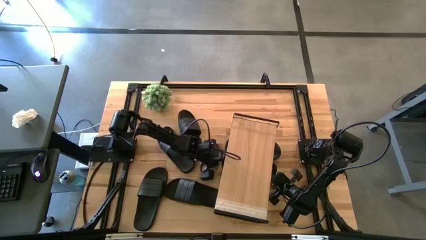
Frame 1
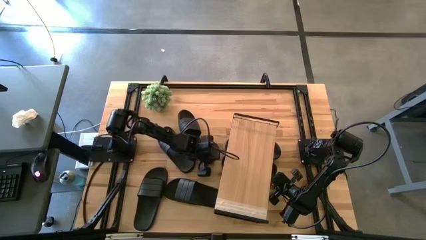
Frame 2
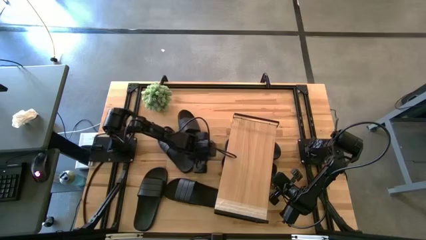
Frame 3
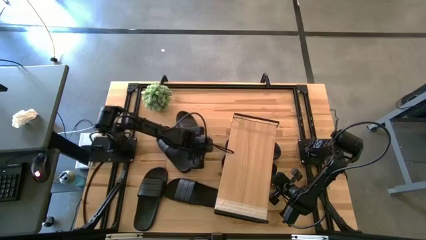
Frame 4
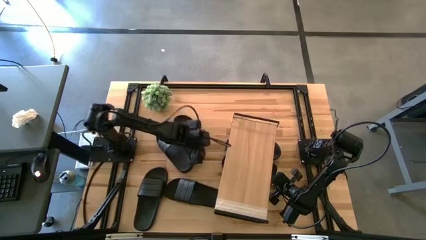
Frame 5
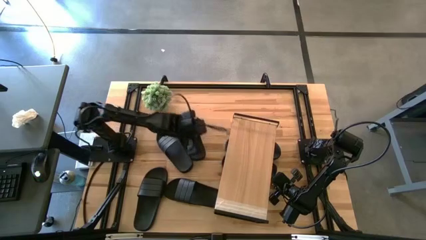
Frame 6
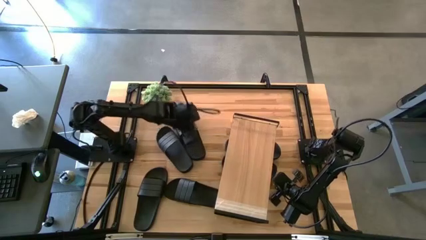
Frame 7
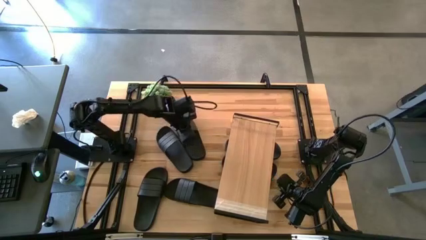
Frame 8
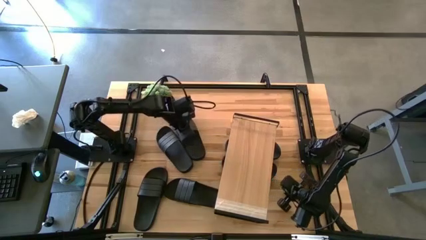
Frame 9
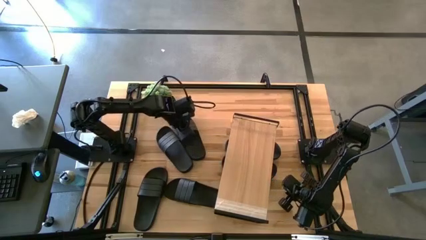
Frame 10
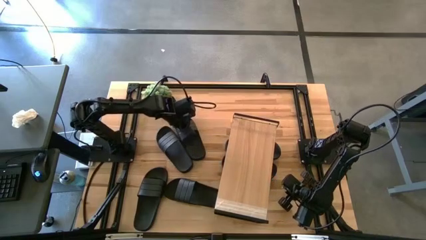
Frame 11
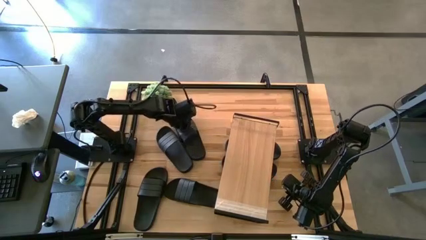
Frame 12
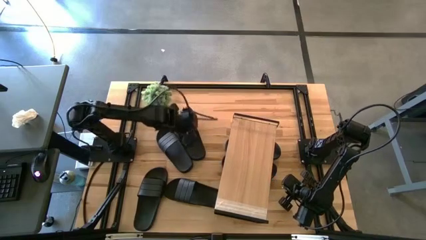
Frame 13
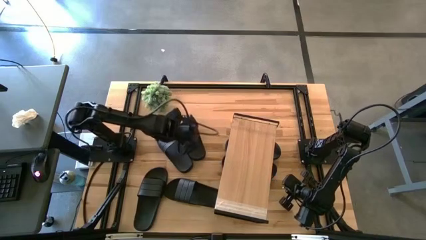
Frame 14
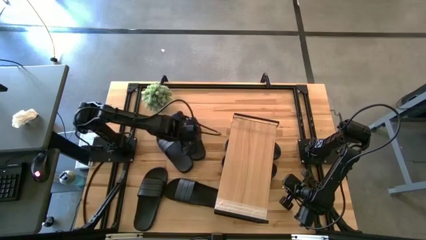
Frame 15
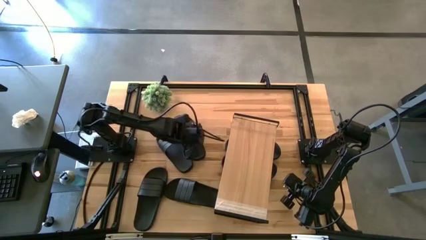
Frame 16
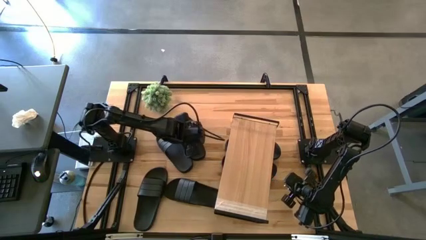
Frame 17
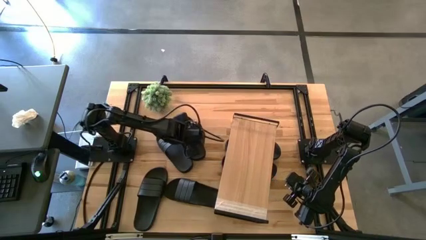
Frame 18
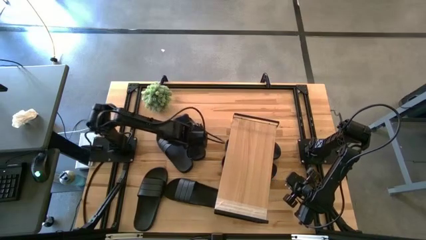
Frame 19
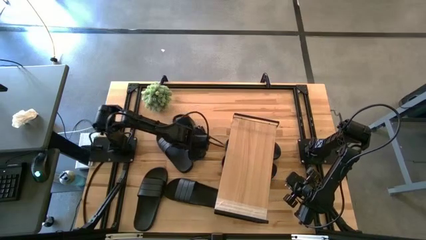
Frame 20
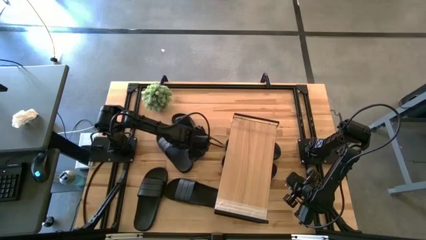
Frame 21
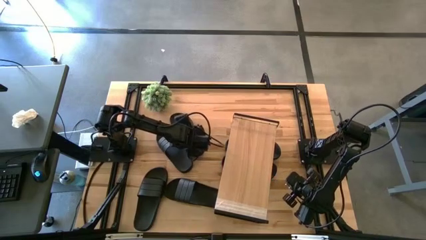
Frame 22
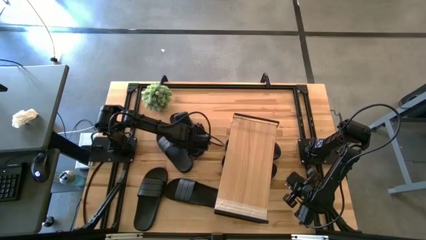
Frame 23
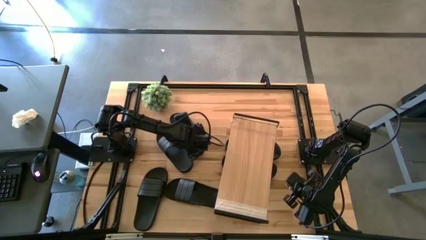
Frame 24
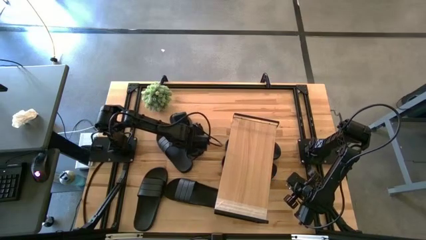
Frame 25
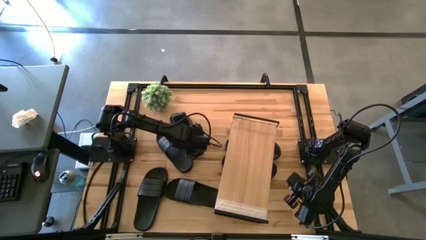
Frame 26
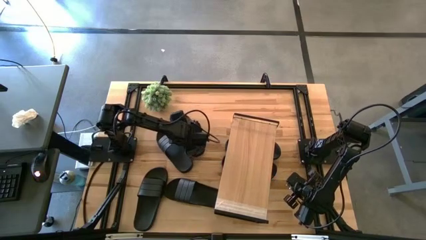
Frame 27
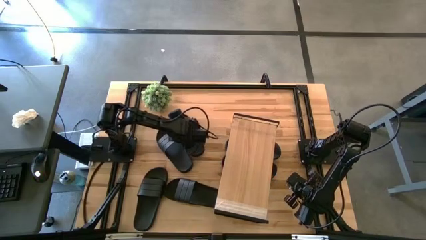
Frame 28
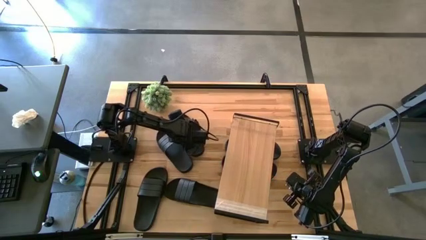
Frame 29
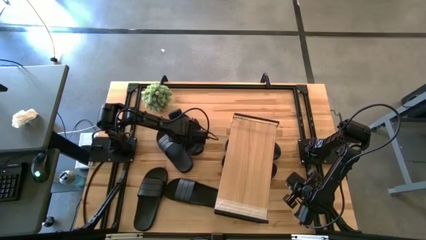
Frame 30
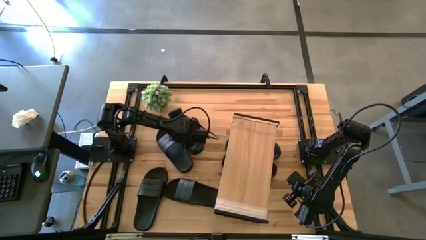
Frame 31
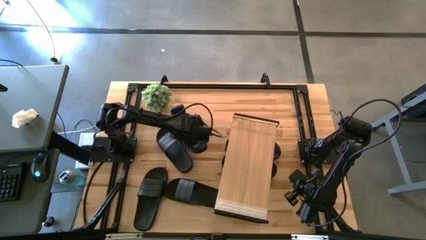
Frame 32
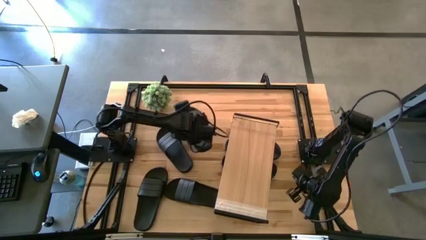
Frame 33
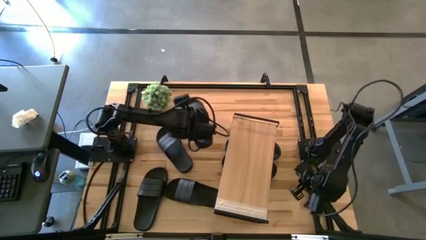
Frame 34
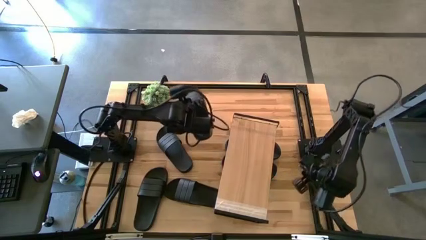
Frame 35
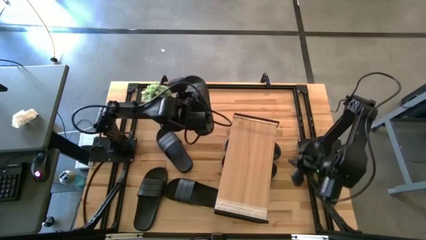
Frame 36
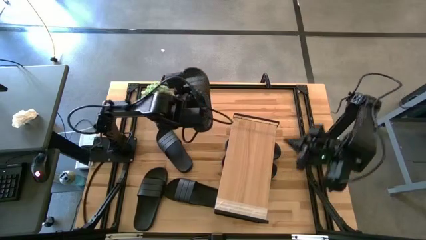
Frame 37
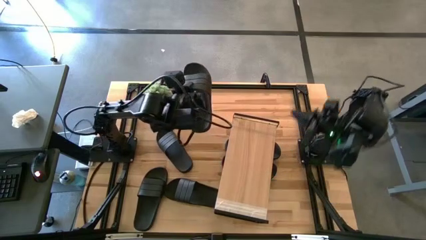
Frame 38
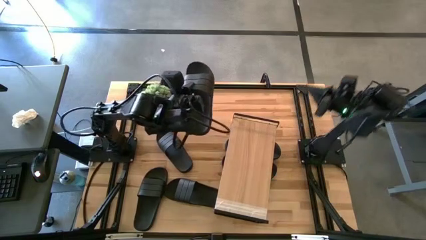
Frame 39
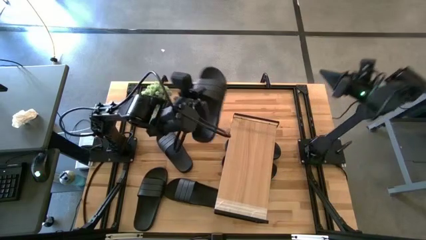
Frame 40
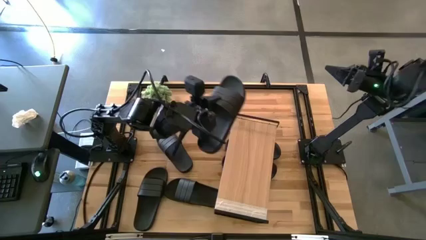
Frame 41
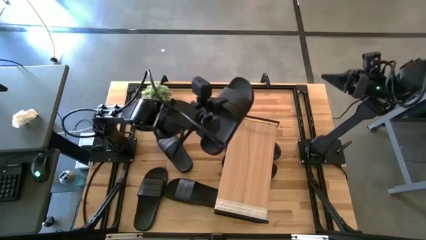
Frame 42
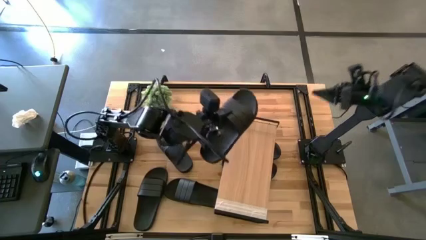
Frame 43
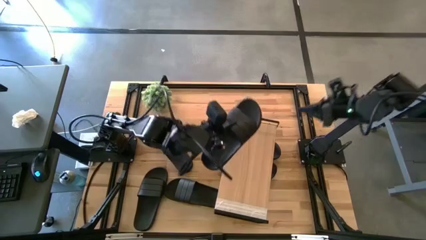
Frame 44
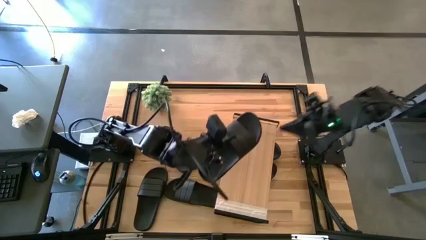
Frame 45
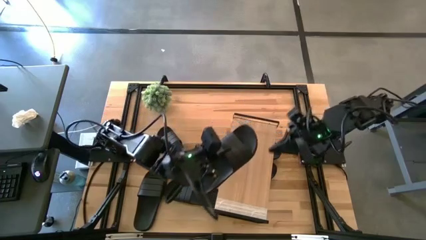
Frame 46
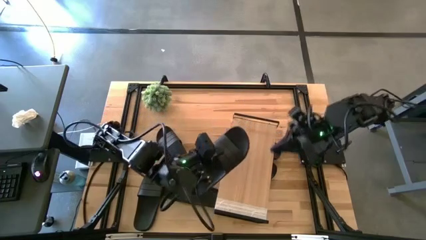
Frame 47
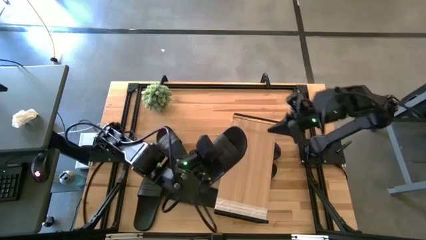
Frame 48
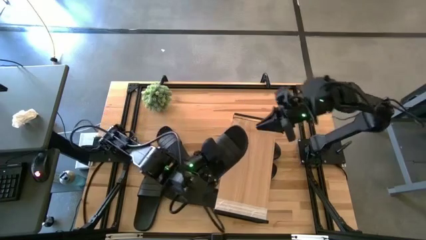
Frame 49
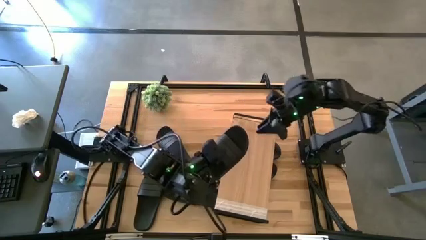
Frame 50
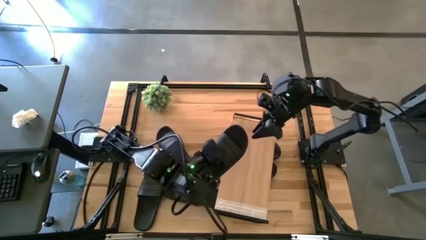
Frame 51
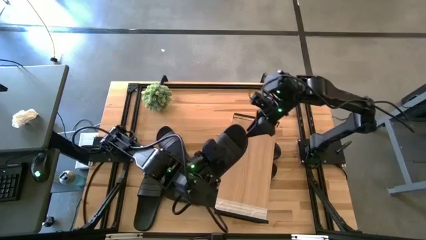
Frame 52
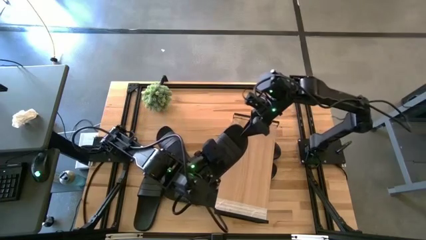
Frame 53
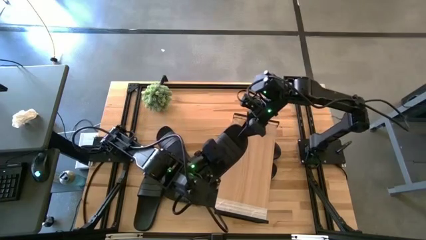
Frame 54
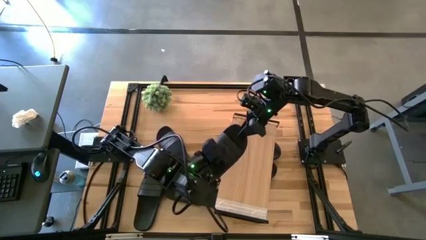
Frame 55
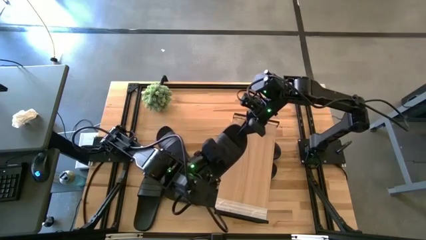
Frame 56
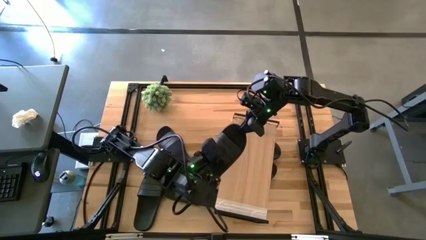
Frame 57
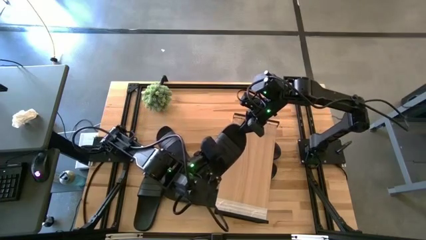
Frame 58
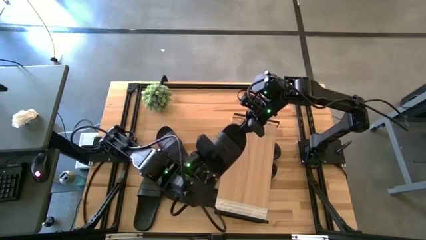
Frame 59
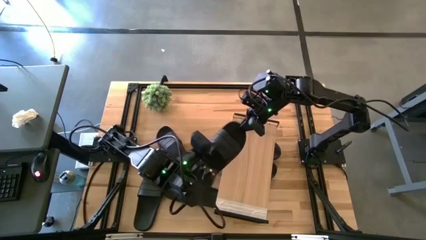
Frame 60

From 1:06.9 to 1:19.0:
Task: Pick and place slides into the shelf
Put the black slide on the shelf

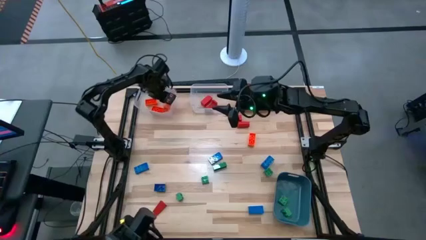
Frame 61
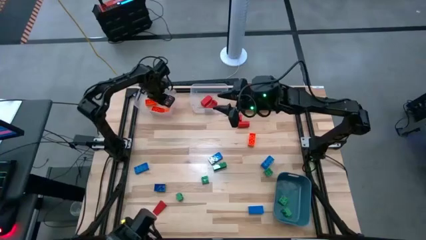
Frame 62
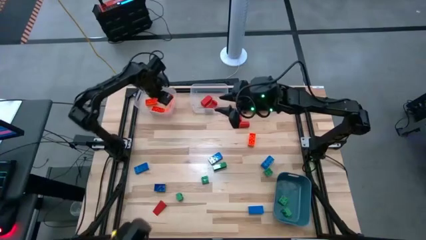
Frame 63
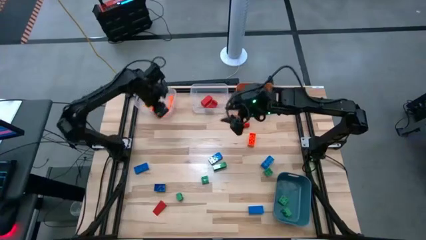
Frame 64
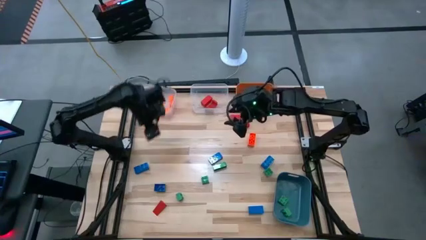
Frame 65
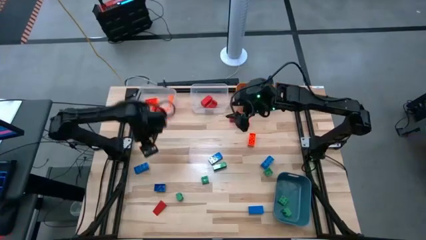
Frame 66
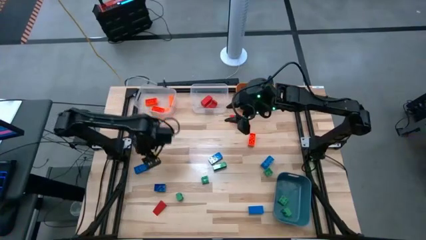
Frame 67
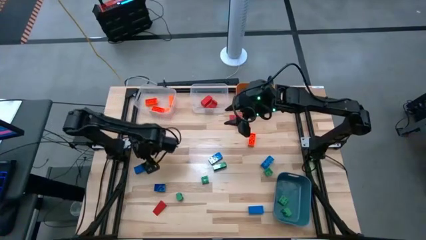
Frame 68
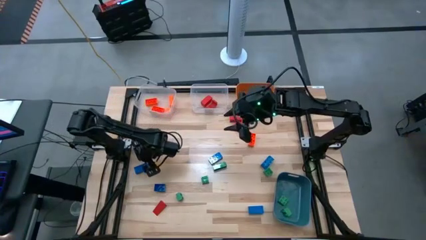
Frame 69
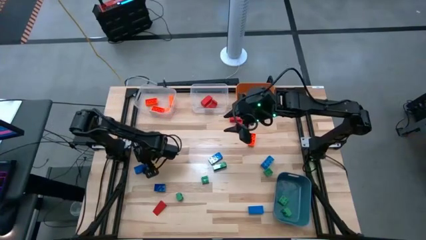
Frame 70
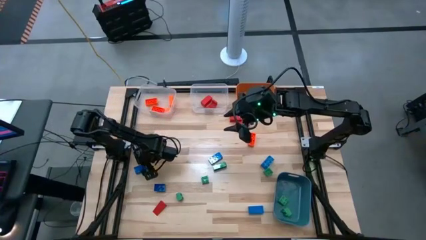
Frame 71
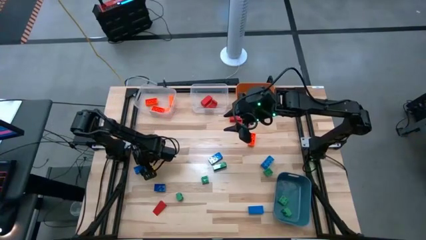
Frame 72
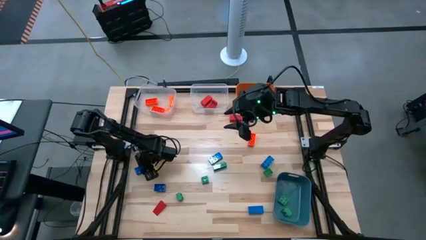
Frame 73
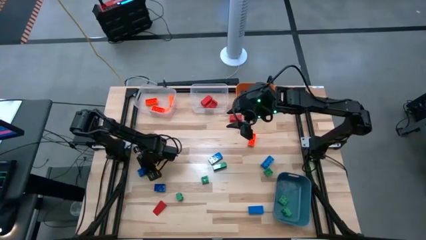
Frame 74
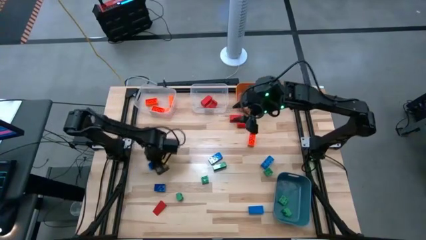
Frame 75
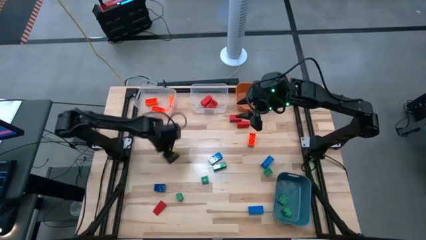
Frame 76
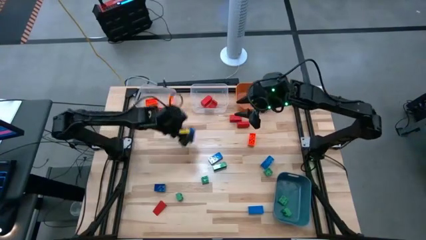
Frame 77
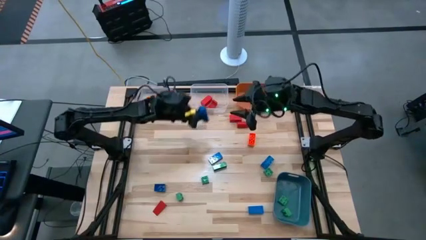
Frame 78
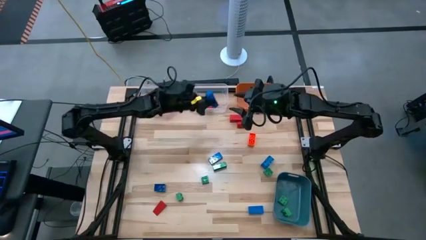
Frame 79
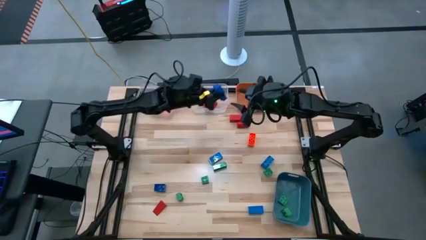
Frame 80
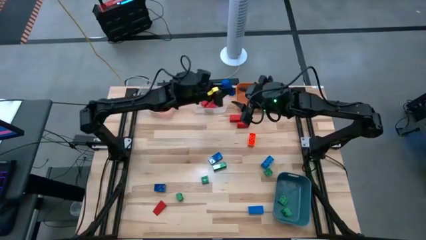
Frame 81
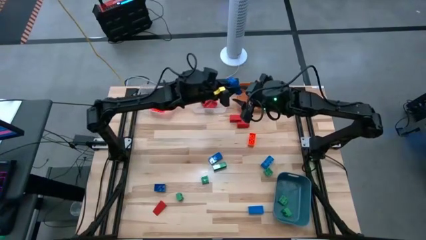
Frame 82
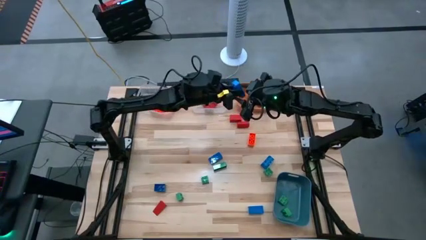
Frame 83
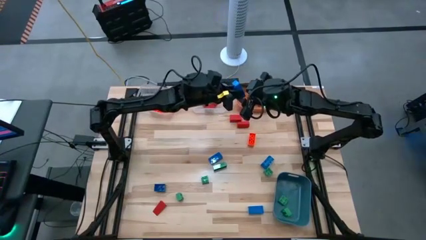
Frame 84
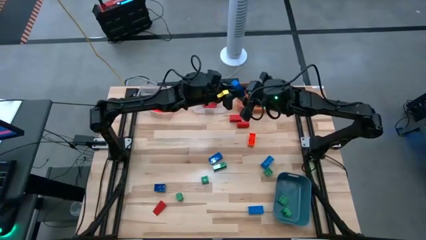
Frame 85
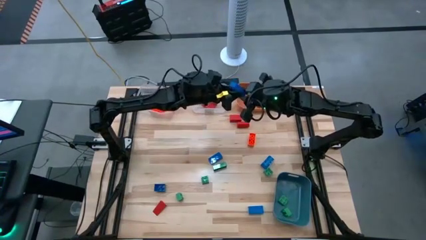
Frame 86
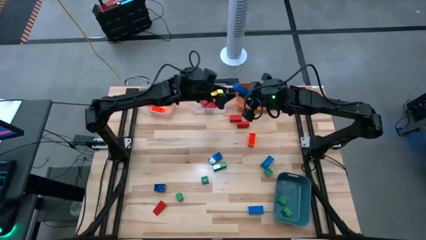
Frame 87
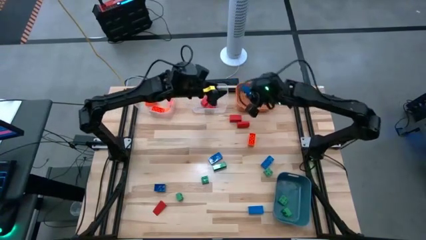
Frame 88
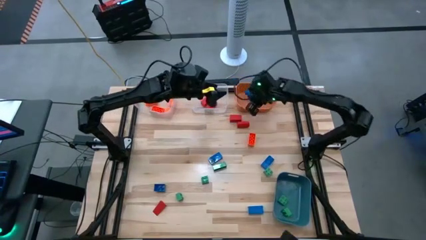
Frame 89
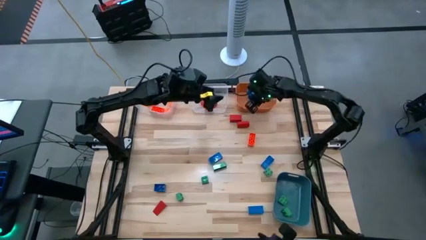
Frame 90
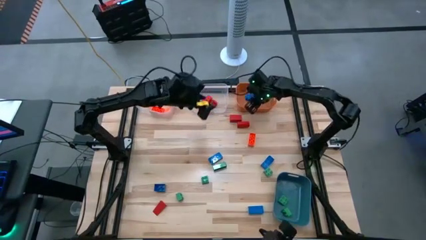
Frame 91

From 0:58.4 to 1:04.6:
Task: Sort blocks
Put the blue game piece into the orange bin
